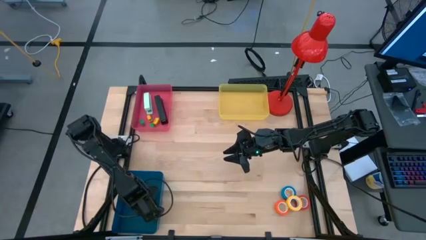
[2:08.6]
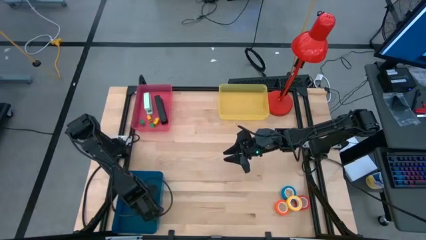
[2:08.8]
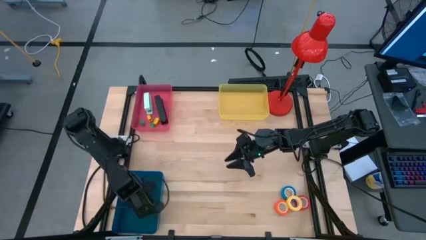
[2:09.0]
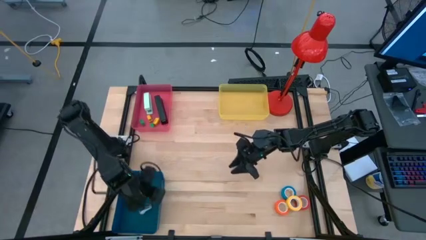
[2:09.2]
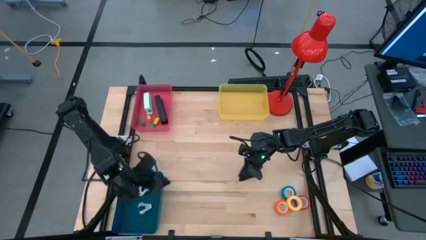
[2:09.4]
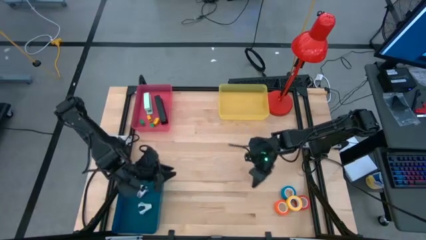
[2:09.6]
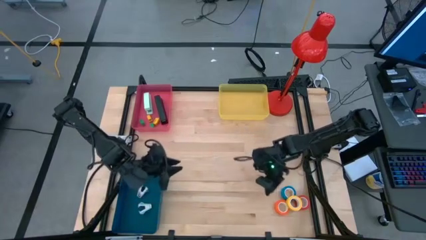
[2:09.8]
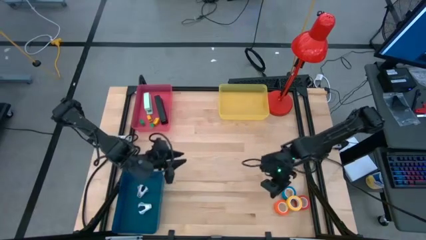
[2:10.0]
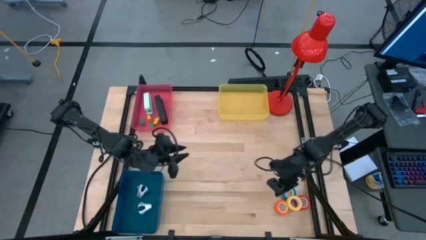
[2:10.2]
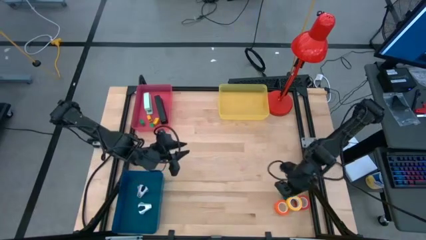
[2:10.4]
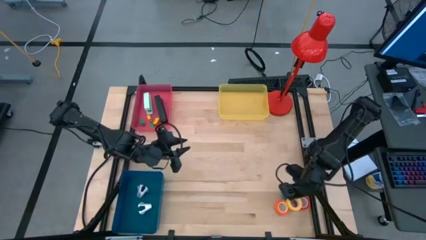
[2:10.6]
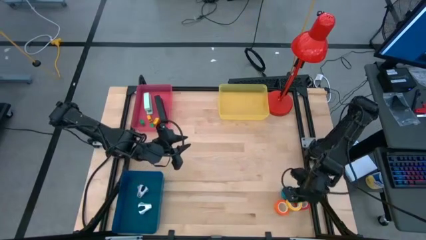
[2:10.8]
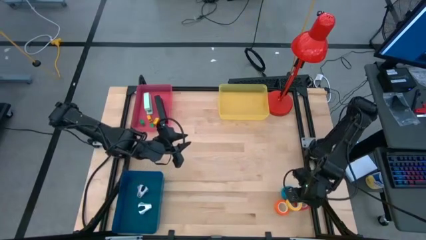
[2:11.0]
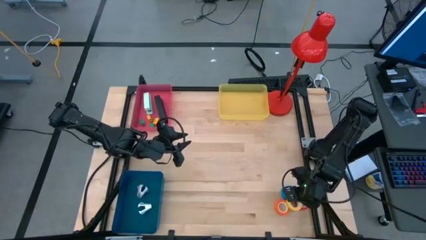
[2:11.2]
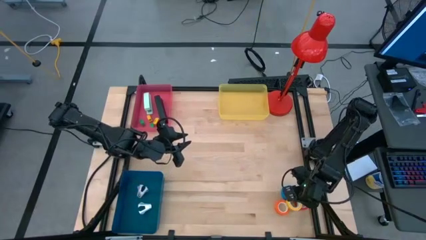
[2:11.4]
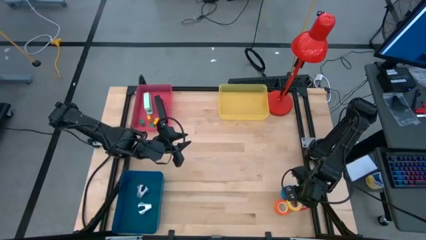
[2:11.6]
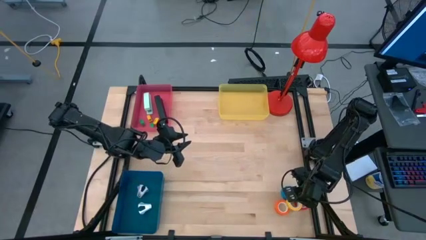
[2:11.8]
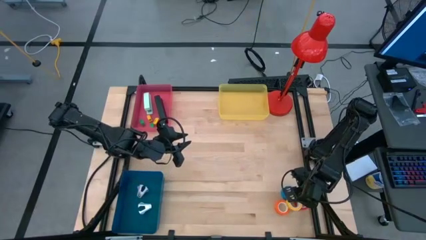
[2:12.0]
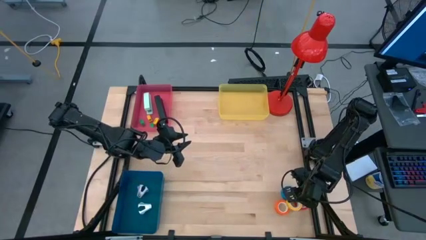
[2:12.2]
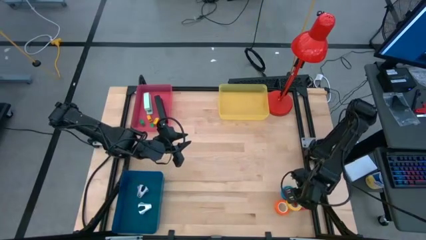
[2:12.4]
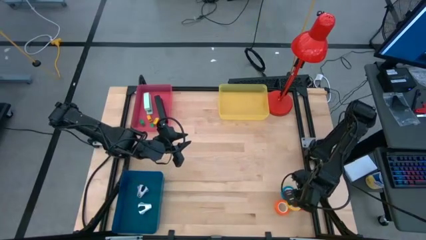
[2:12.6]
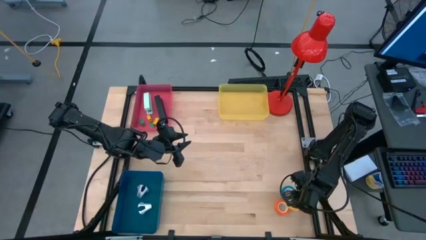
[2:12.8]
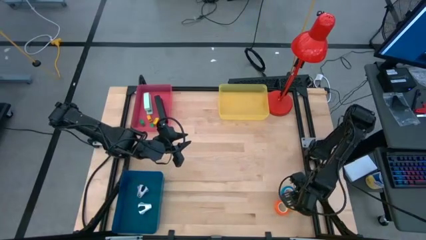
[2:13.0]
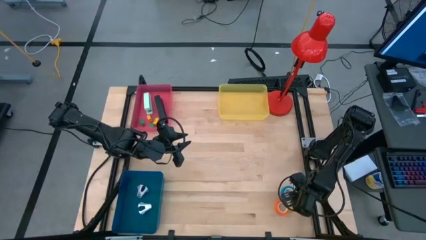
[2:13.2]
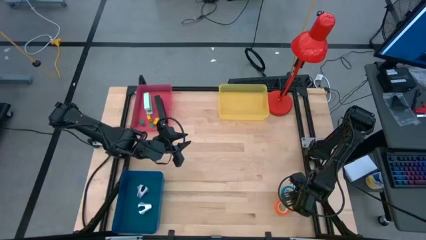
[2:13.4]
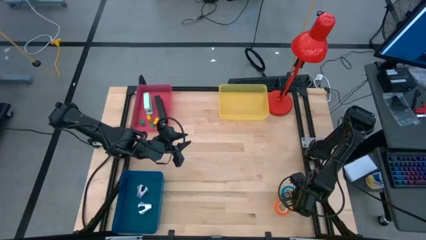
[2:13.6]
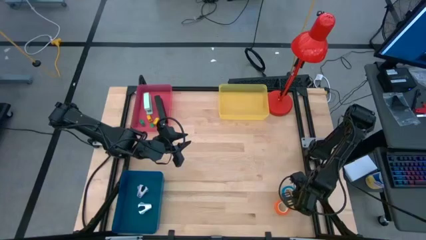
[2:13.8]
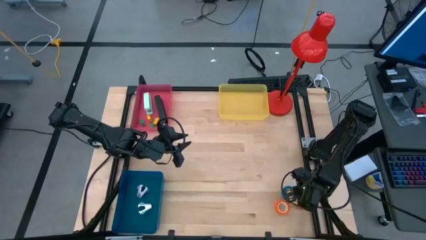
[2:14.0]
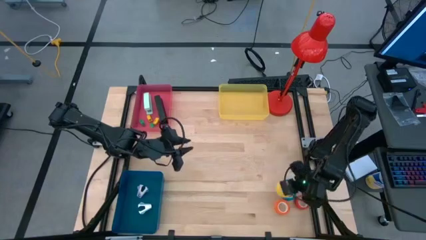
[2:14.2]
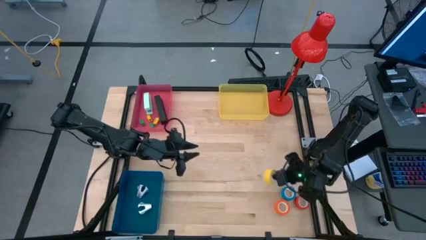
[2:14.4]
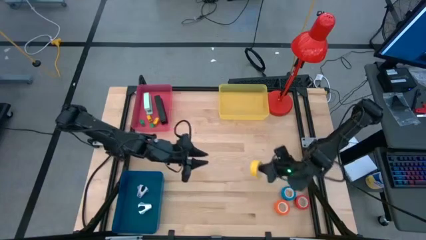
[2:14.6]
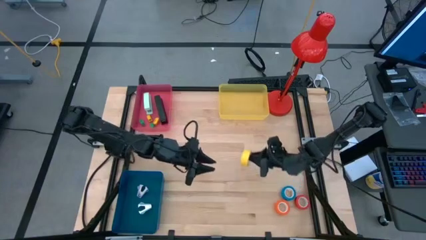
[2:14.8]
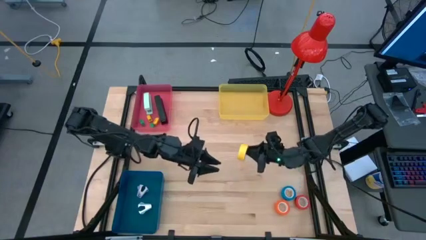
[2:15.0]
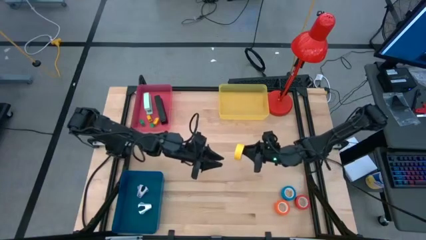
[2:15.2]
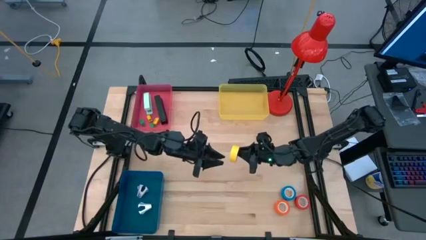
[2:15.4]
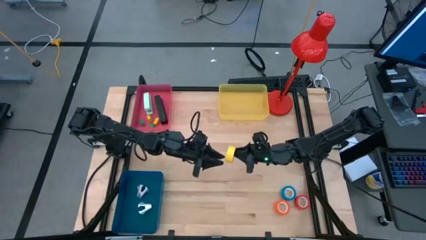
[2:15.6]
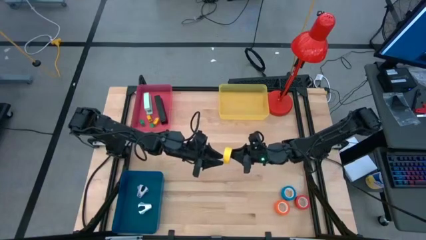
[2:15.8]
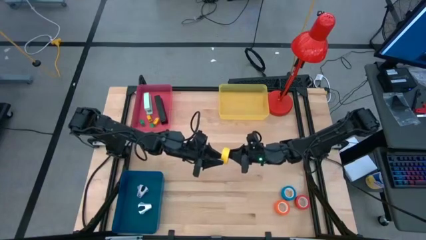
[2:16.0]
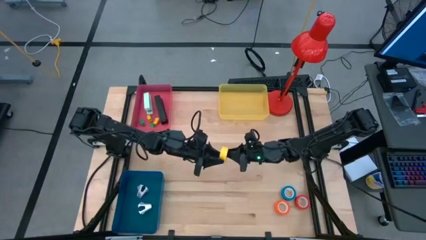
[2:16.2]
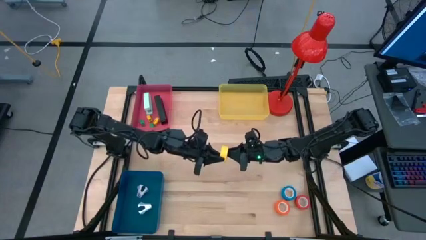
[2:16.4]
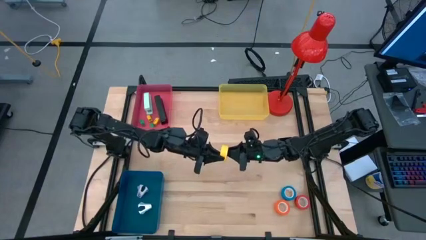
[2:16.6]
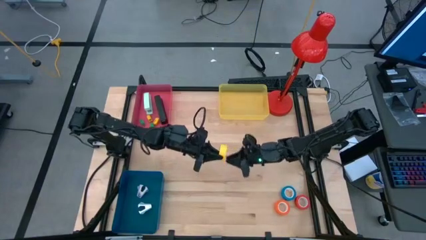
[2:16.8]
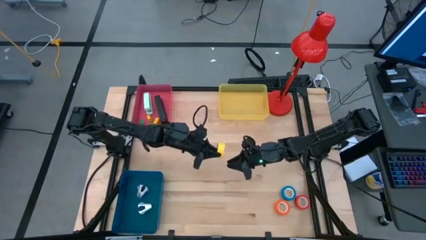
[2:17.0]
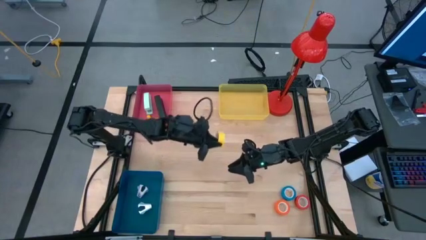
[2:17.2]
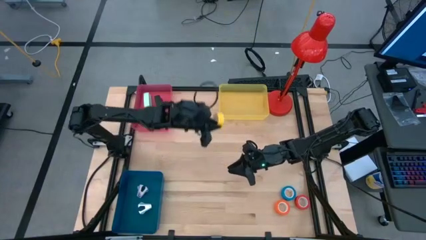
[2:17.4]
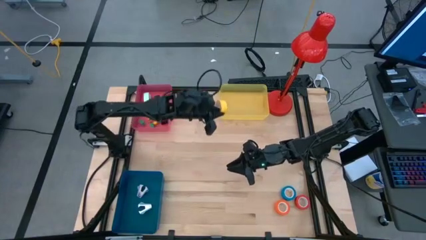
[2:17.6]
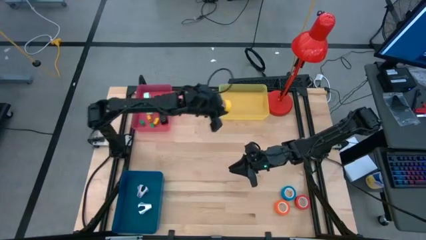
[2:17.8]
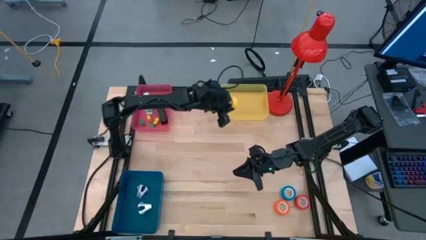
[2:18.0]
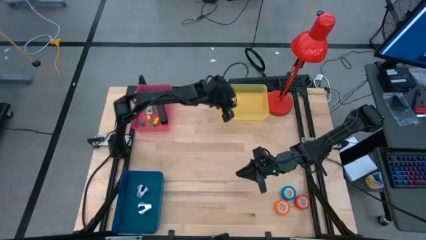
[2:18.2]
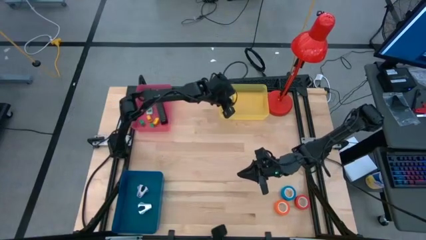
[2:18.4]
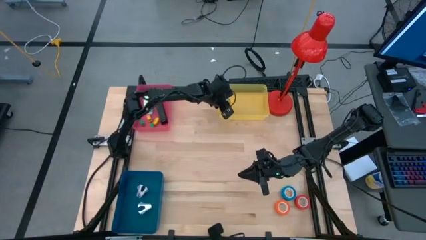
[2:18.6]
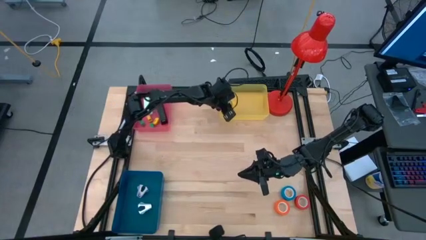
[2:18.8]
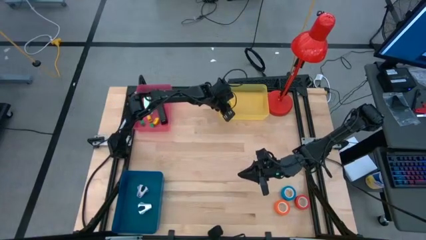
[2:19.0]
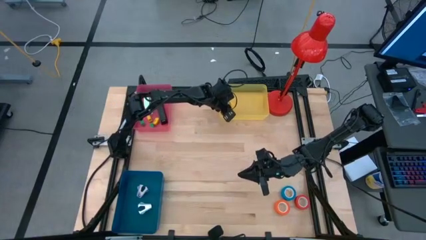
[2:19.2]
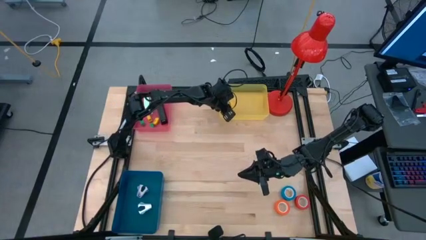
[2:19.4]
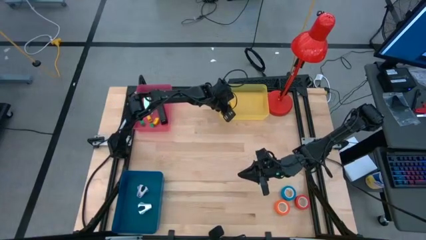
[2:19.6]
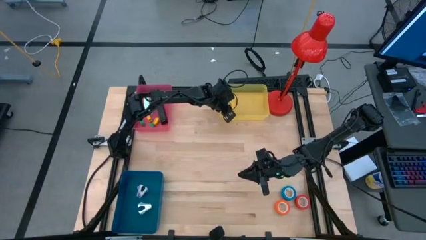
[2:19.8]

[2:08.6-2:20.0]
Task: Pick and place Stapler, Stapler remover, tape
Put the yellow tape into the yellow bin
